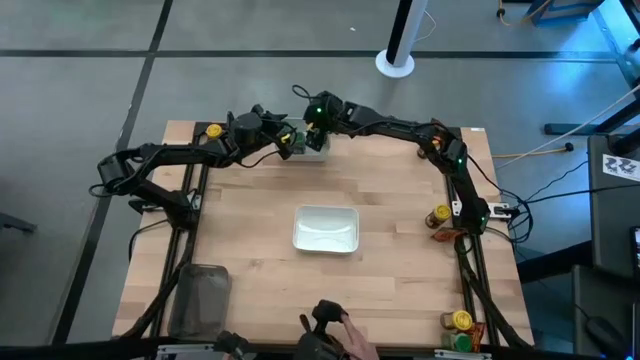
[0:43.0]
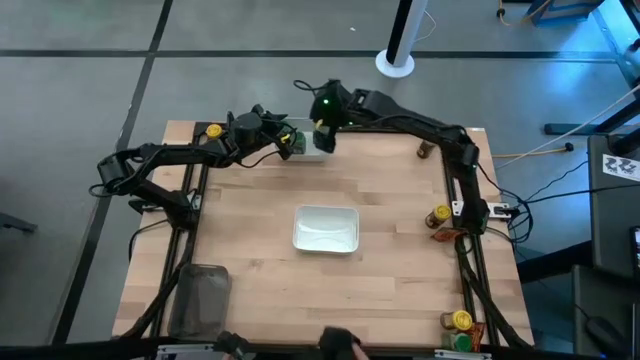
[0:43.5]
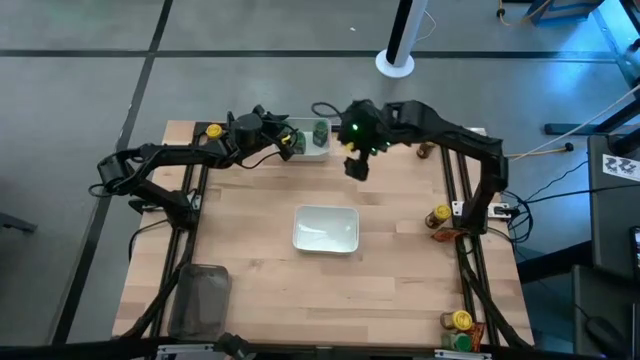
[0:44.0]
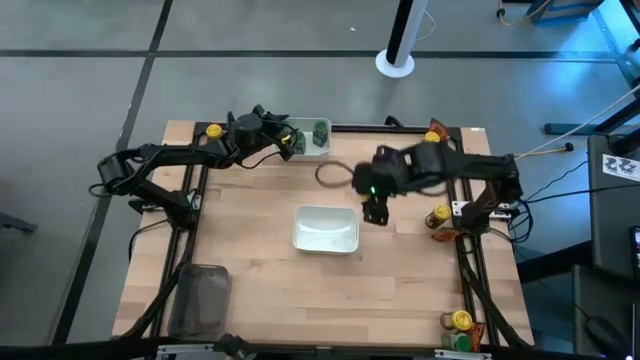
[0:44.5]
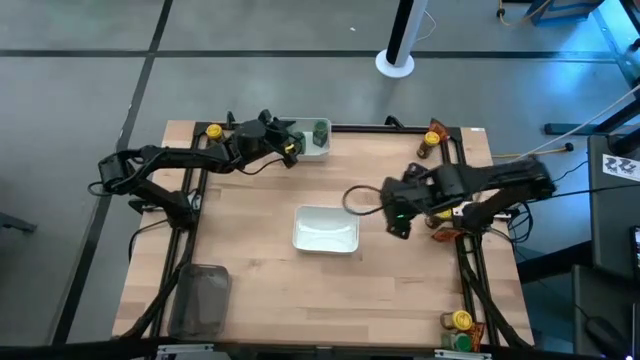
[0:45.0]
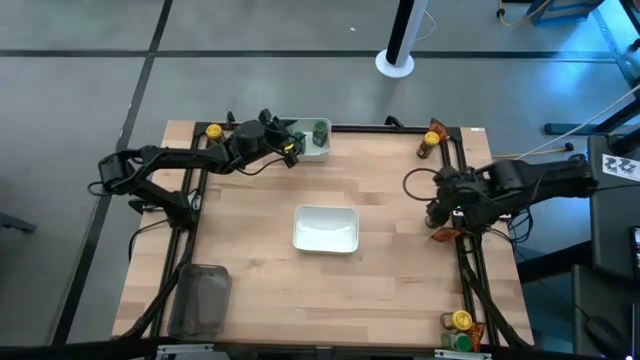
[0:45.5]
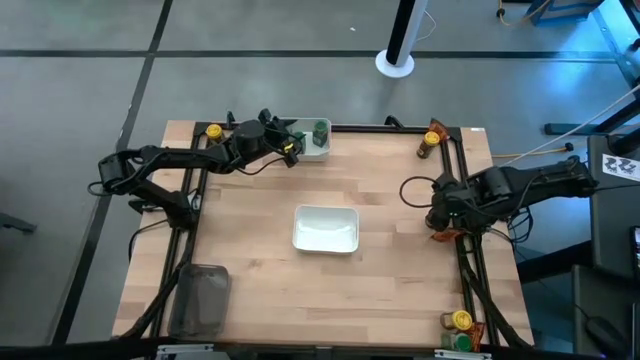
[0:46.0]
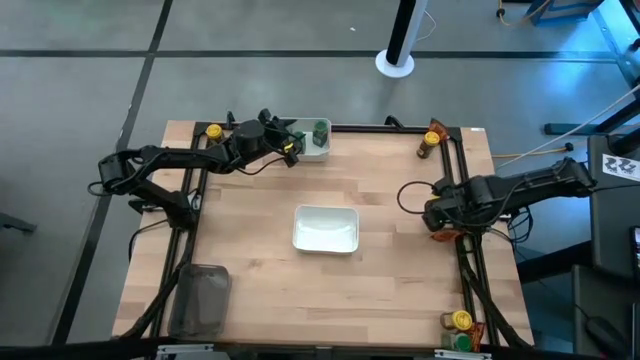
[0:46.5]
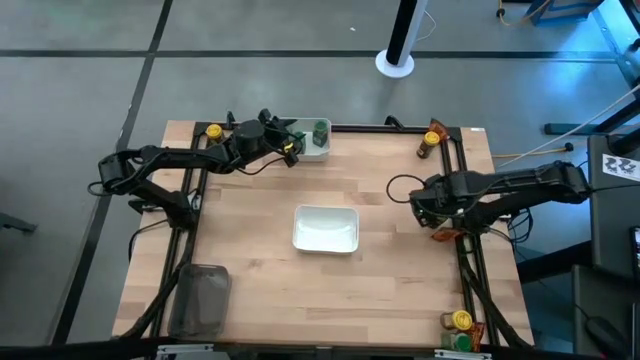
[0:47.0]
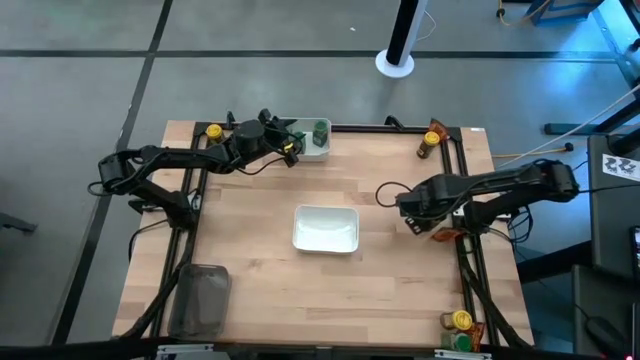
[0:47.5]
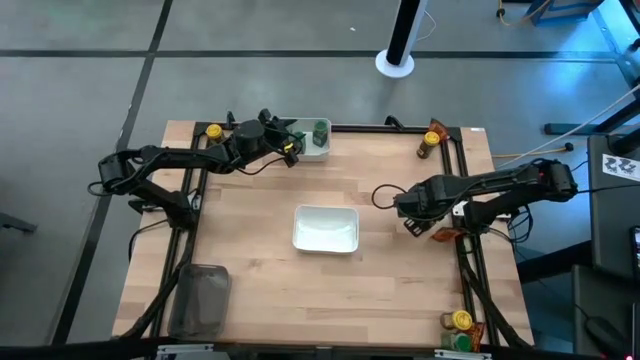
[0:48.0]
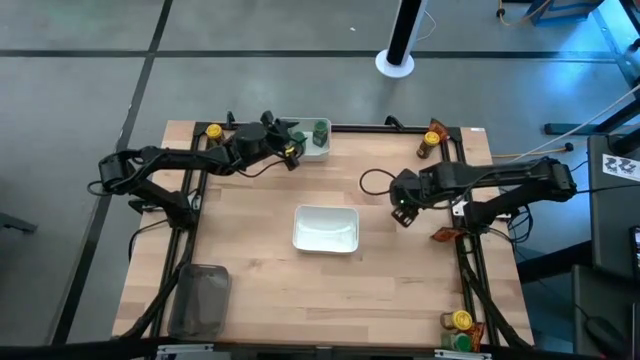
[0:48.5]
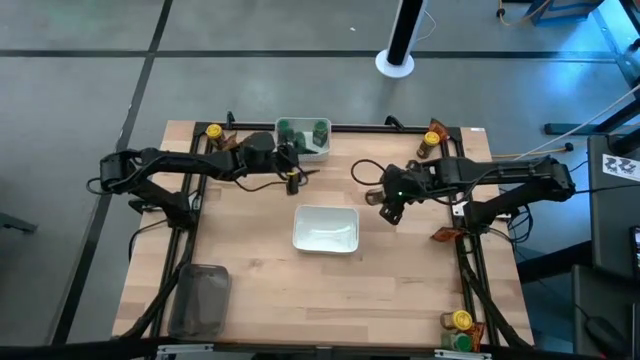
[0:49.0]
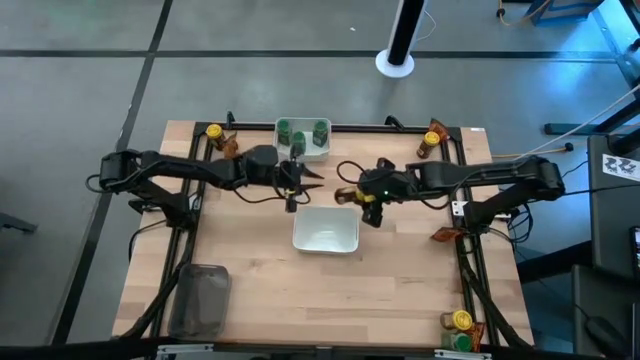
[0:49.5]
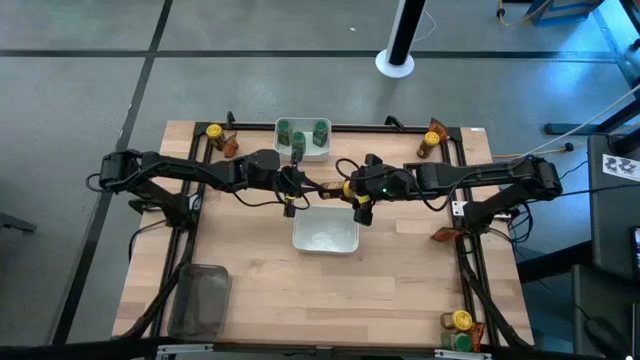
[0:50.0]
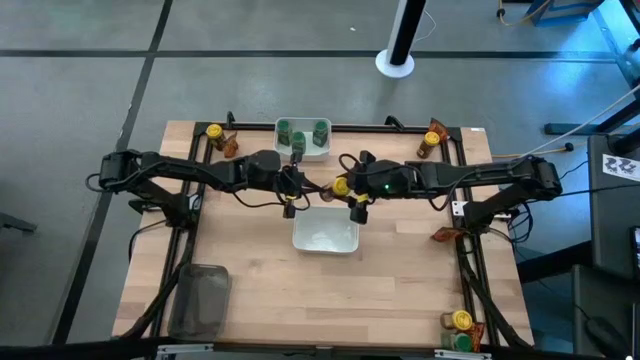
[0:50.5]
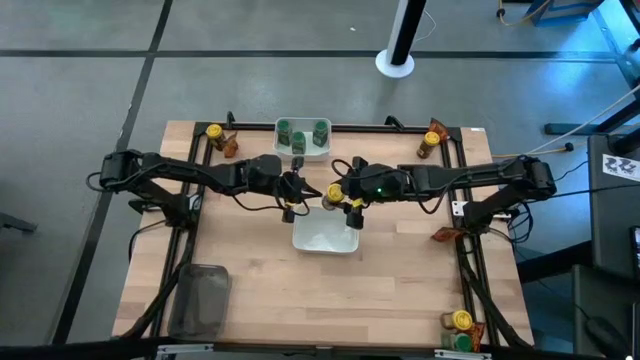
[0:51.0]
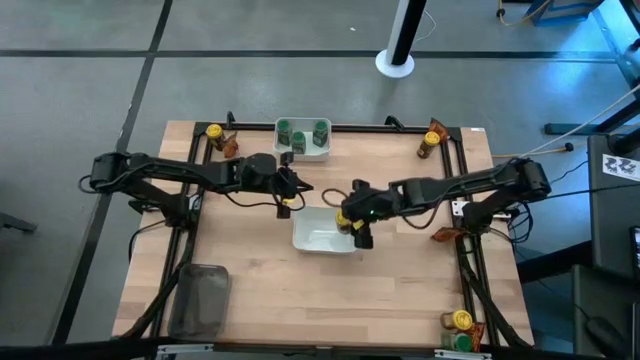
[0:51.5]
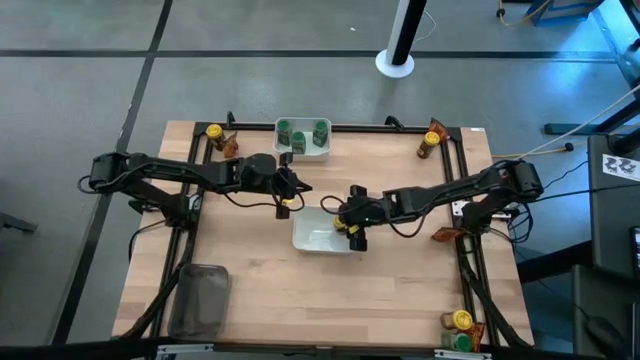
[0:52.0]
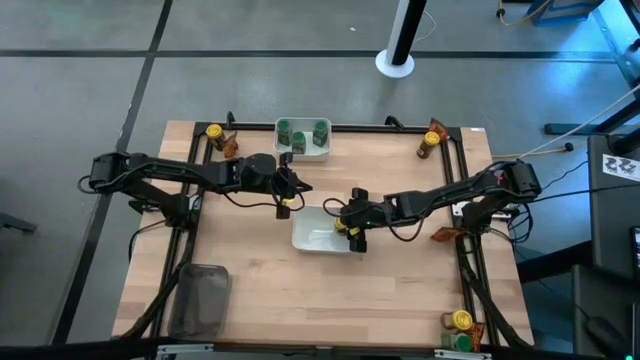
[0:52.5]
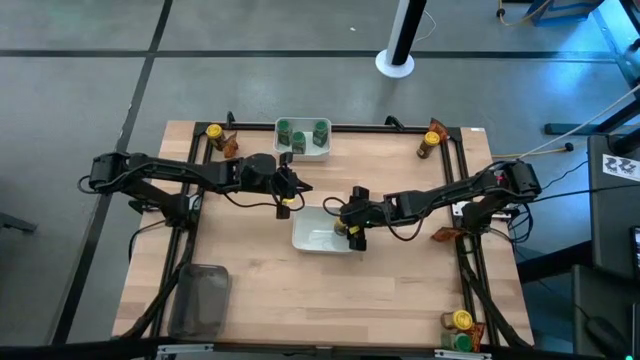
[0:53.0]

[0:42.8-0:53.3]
Task: Sort spices by type
Put the middle right yellow seasoning bottle into the bottom white bin

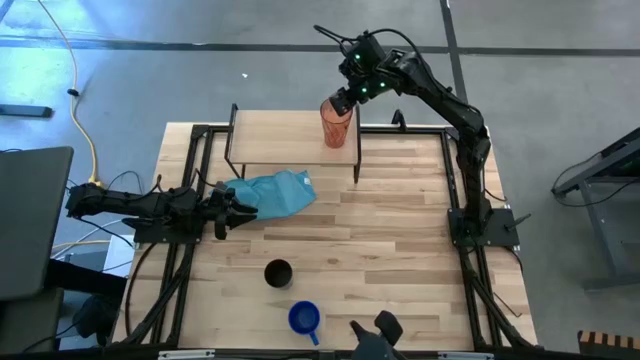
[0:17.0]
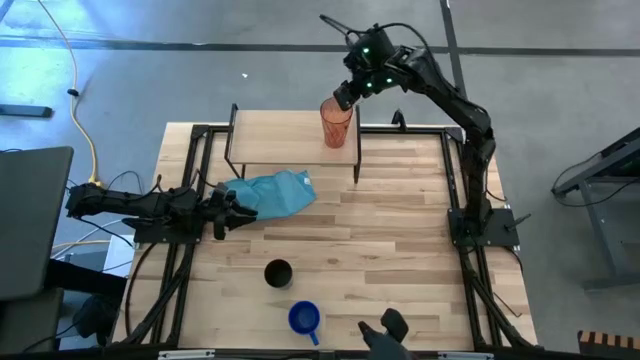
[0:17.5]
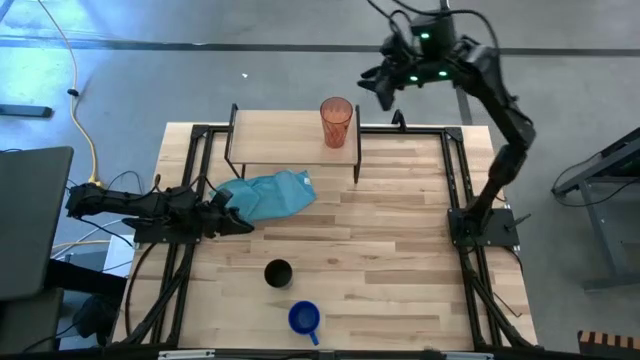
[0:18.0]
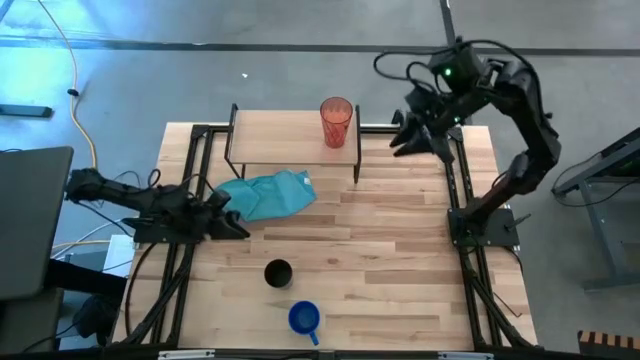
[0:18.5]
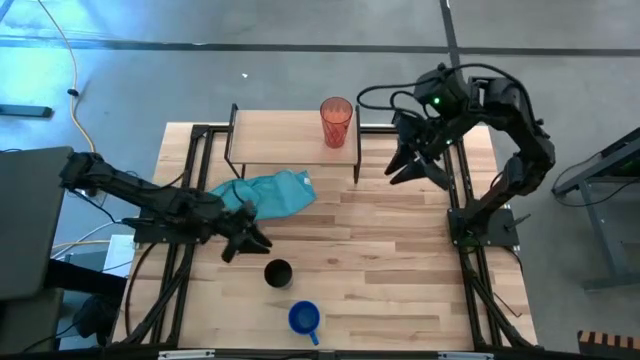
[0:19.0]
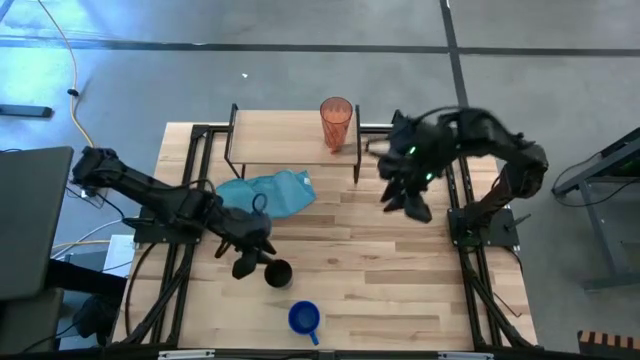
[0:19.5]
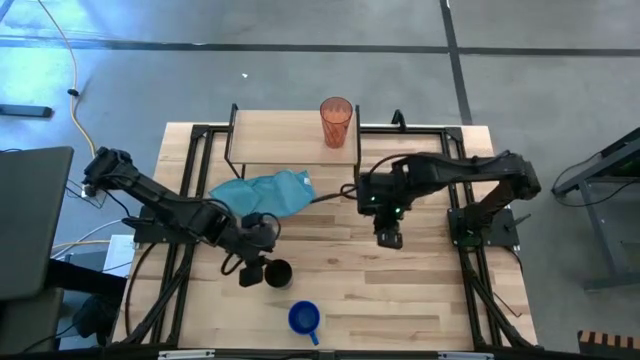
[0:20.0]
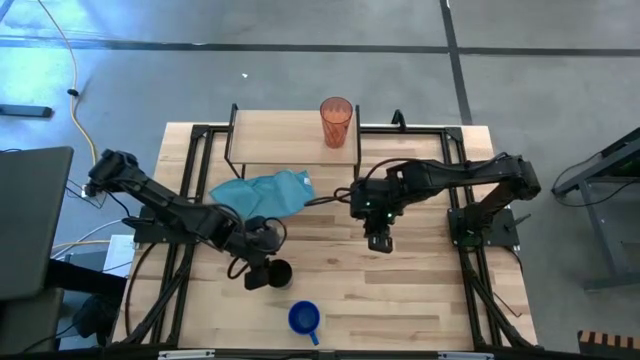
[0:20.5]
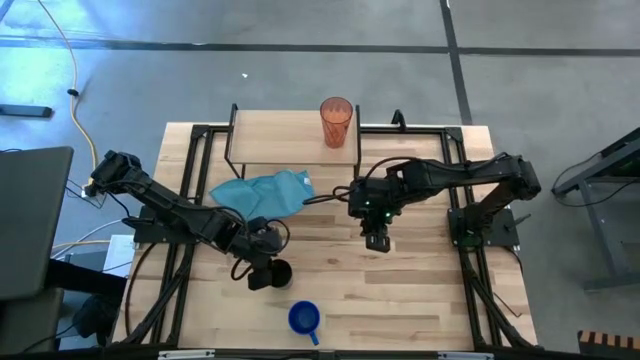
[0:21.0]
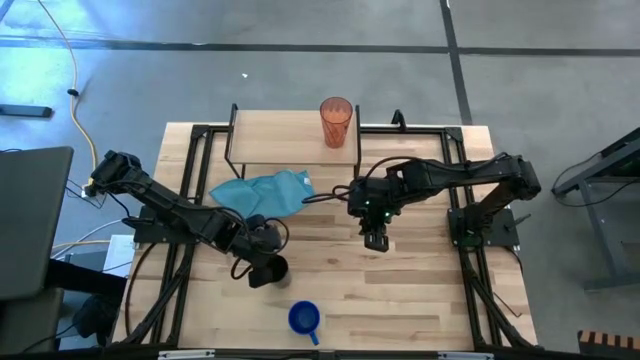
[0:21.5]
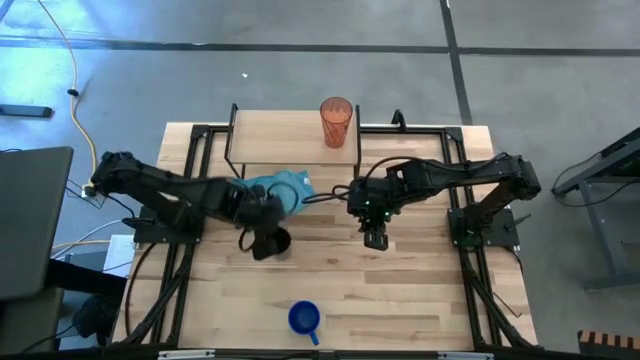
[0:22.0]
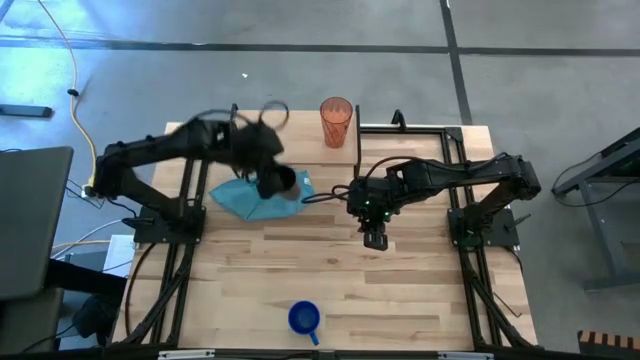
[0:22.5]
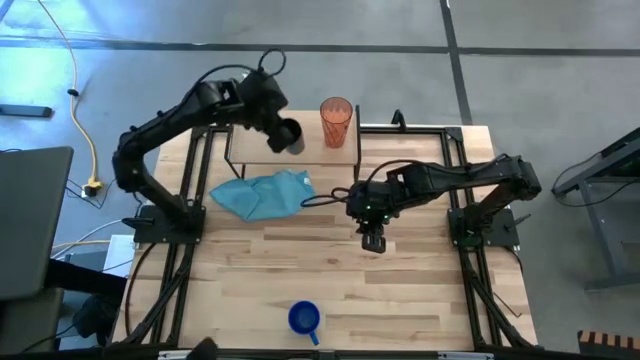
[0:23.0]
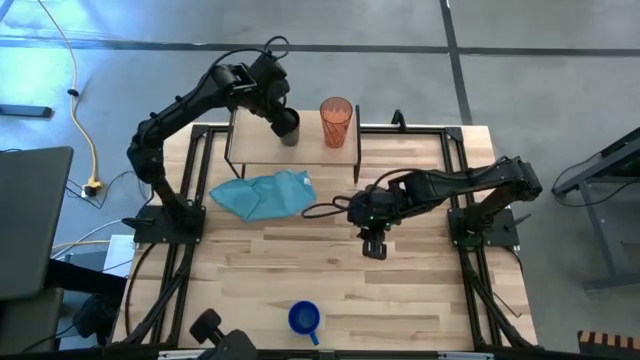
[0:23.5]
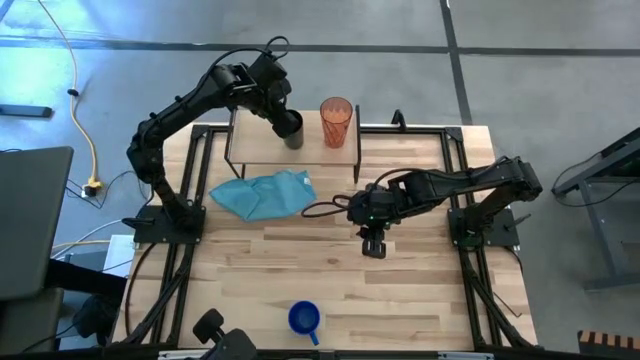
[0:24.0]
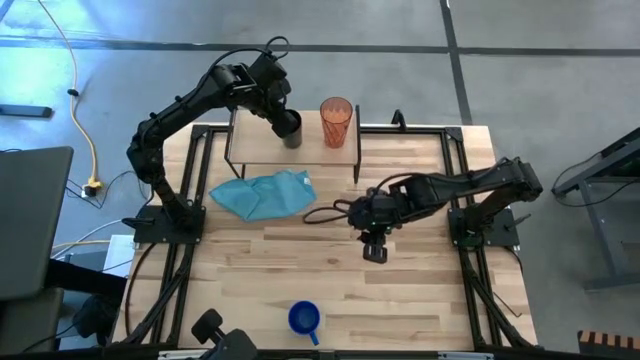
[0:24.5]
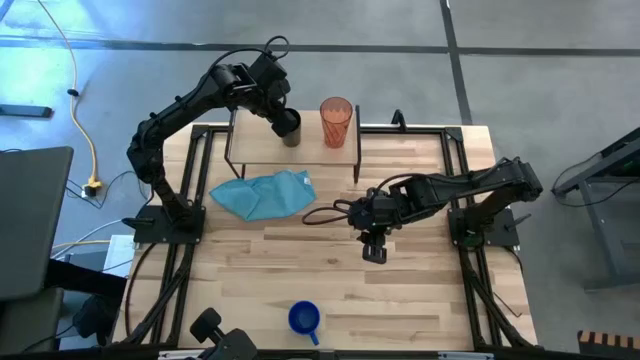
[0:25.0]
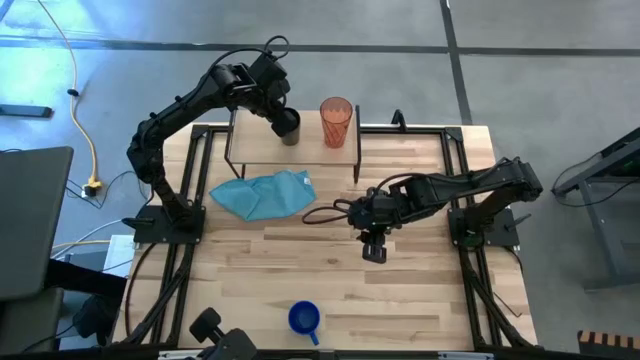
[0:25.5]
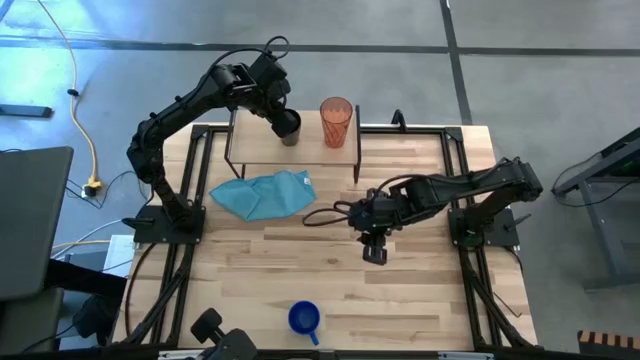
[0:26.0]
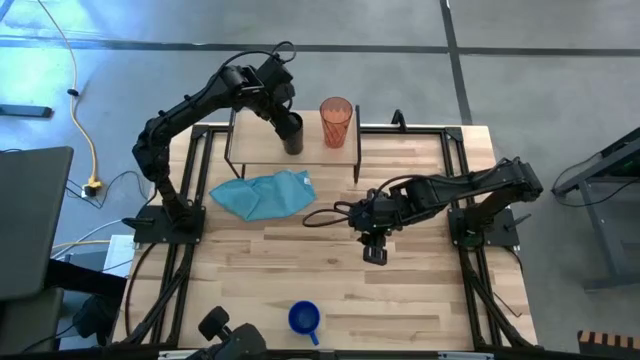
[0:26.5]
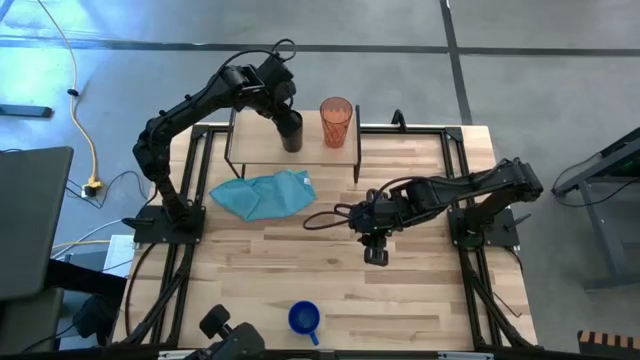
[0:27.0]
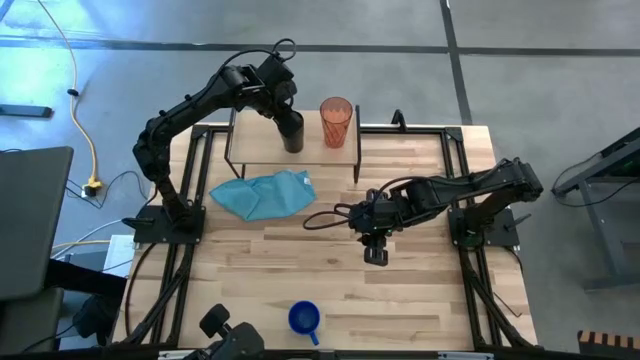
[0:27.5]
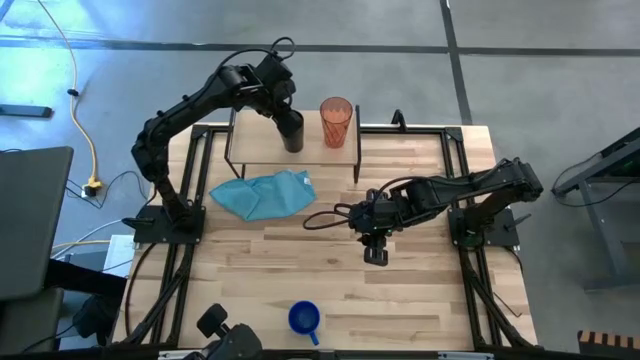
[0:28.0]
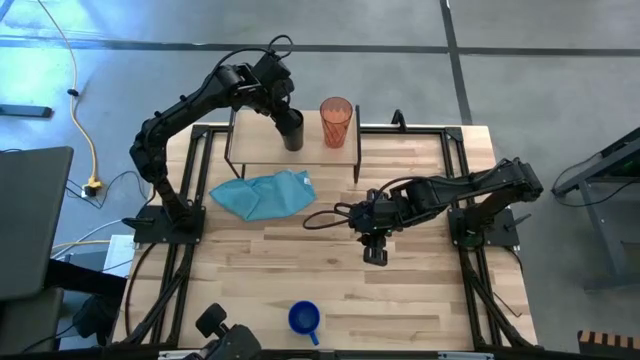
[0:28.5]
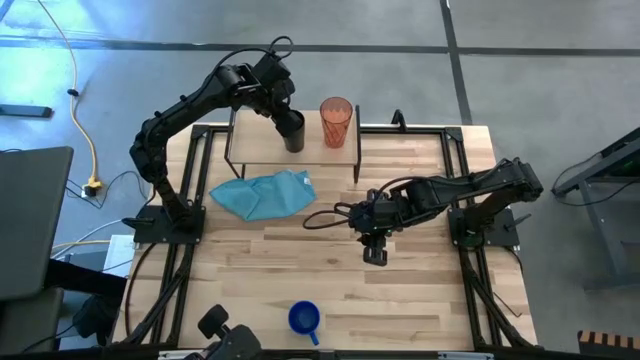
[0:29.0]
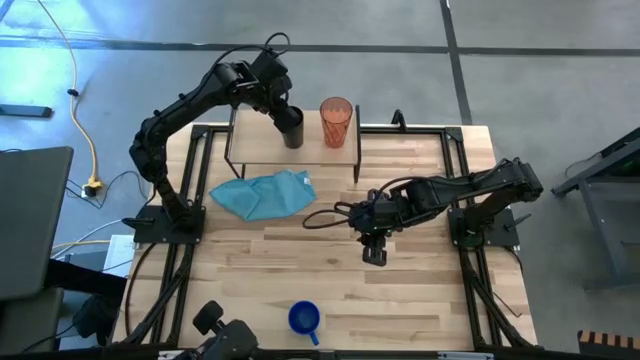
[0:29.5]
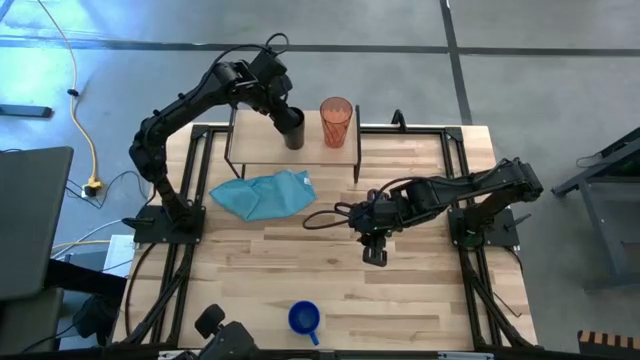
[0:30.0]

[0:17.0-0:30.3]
Task: Stack small to large cups/mugs on shelf
Put the black cup on the shelf
